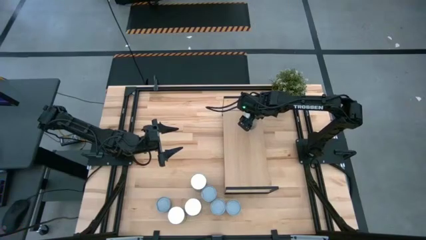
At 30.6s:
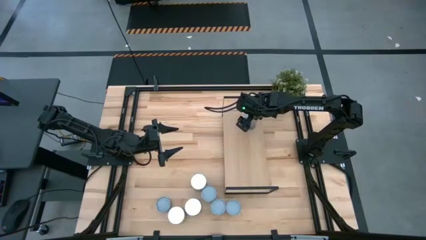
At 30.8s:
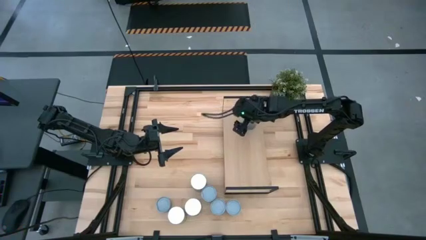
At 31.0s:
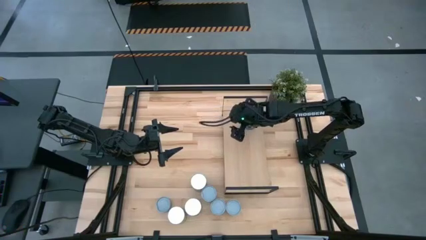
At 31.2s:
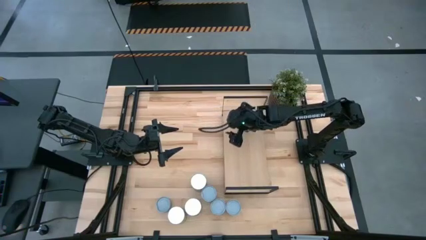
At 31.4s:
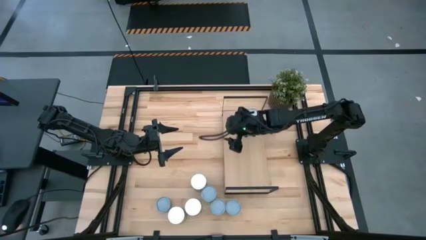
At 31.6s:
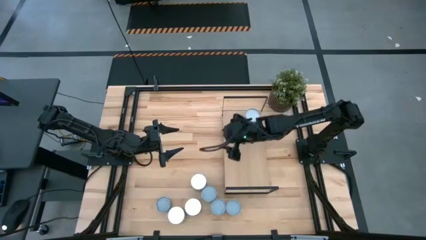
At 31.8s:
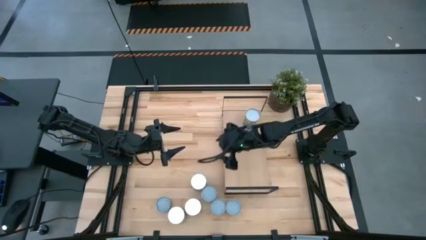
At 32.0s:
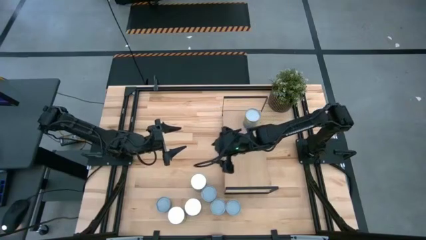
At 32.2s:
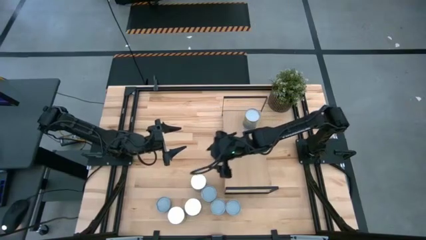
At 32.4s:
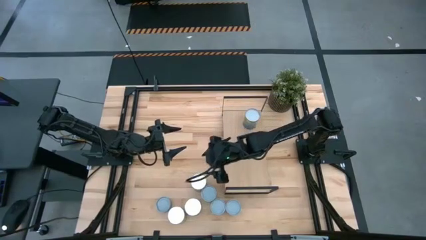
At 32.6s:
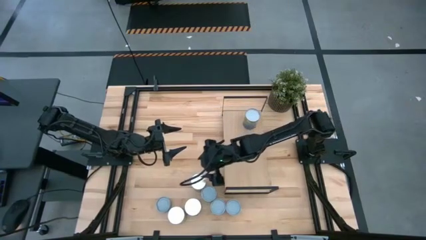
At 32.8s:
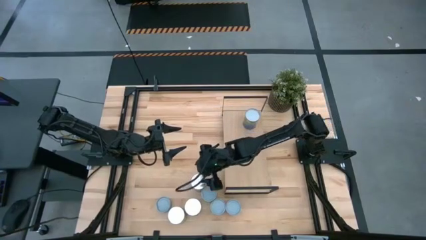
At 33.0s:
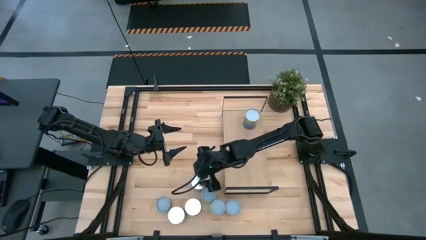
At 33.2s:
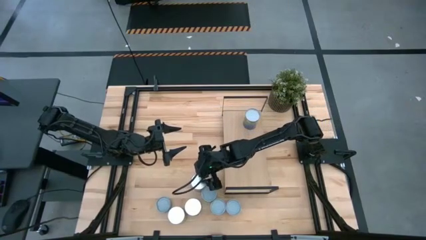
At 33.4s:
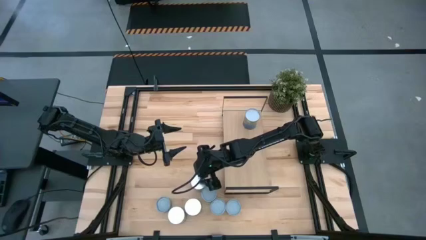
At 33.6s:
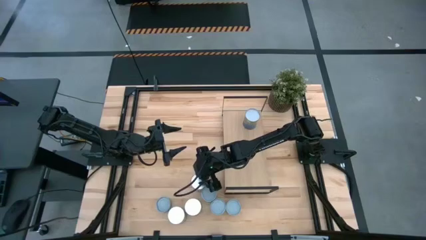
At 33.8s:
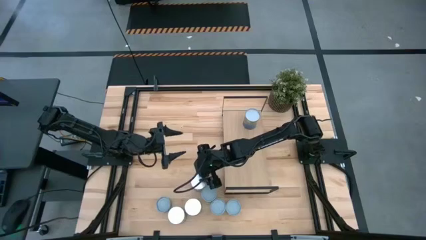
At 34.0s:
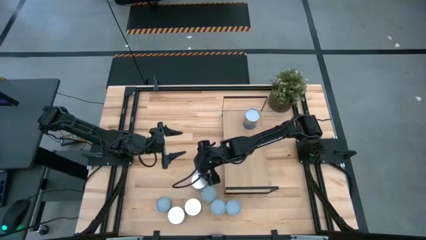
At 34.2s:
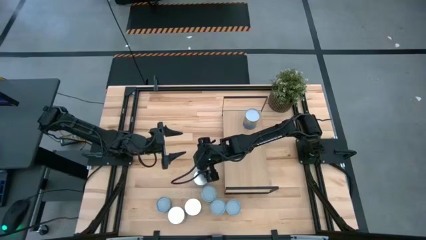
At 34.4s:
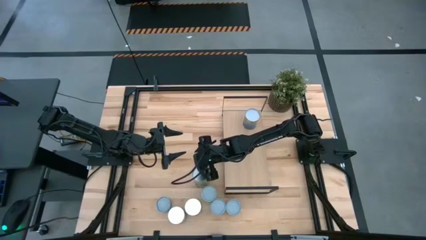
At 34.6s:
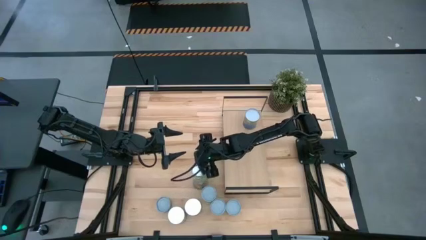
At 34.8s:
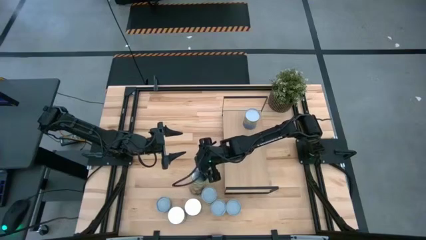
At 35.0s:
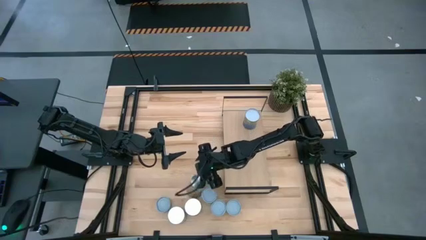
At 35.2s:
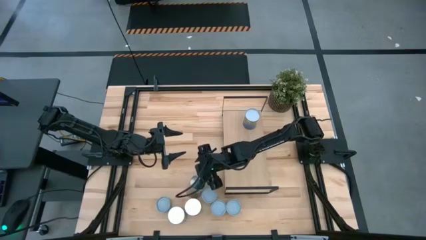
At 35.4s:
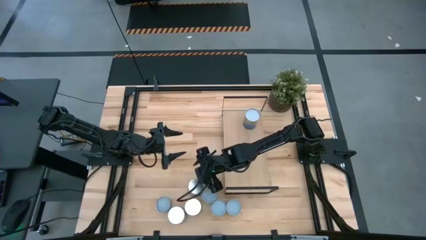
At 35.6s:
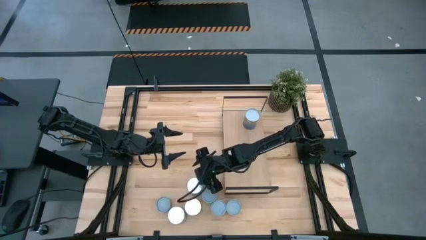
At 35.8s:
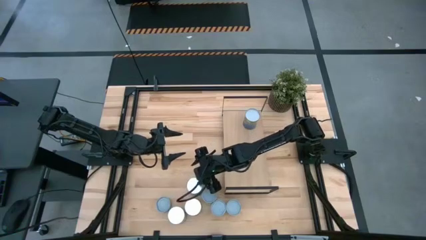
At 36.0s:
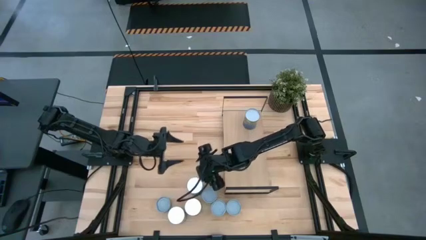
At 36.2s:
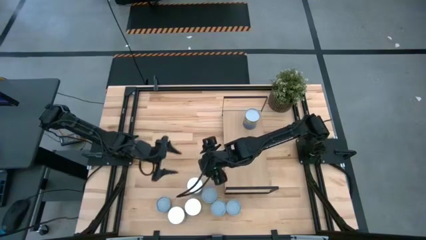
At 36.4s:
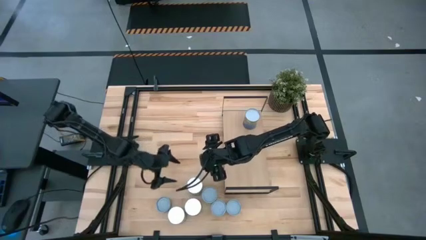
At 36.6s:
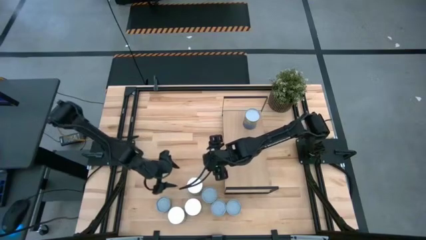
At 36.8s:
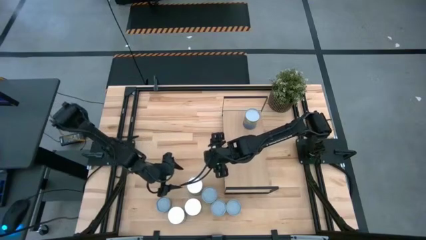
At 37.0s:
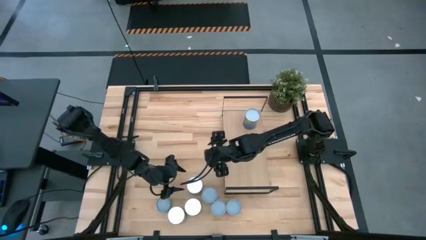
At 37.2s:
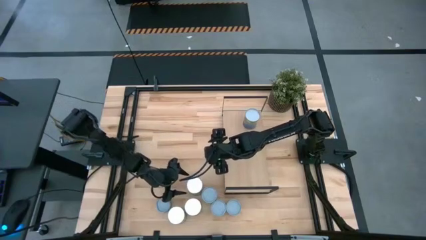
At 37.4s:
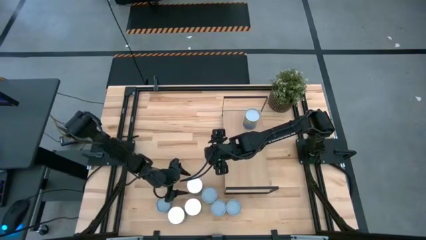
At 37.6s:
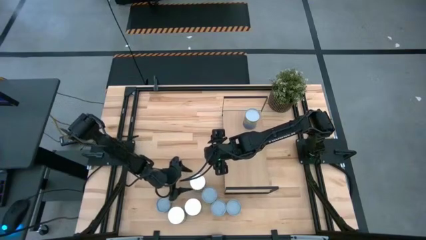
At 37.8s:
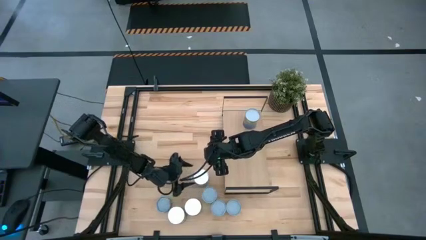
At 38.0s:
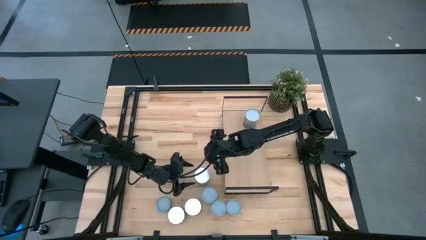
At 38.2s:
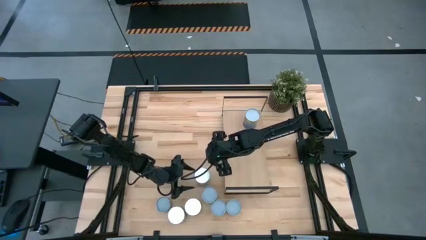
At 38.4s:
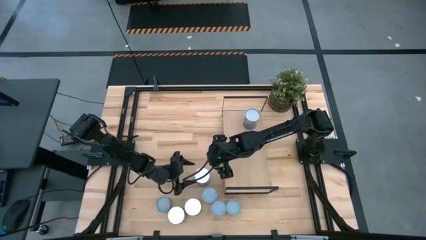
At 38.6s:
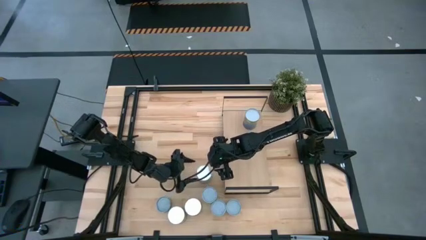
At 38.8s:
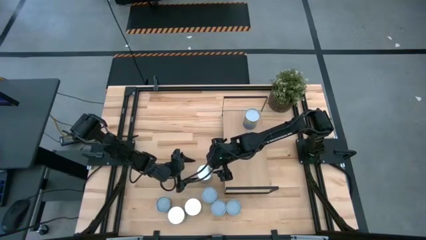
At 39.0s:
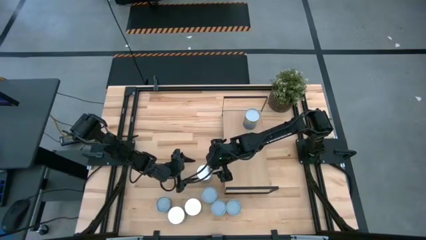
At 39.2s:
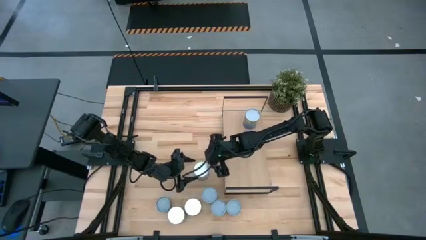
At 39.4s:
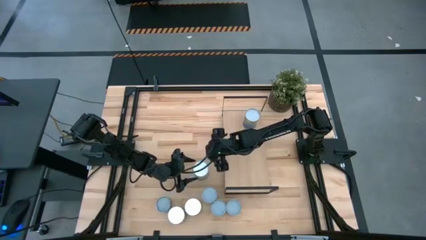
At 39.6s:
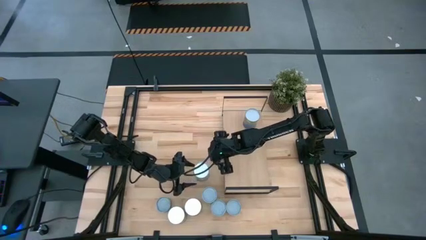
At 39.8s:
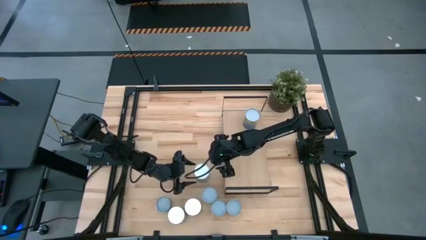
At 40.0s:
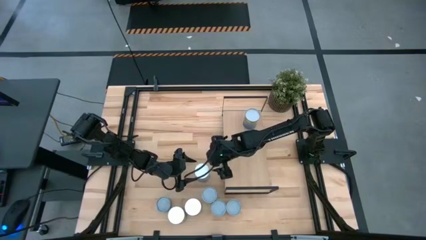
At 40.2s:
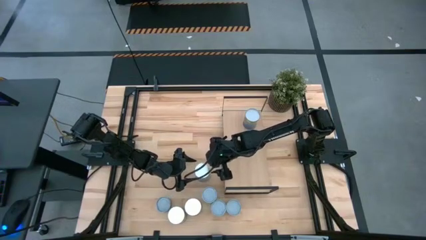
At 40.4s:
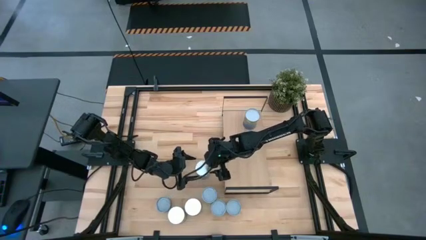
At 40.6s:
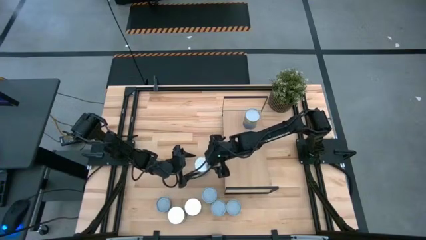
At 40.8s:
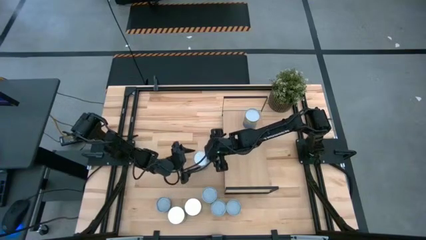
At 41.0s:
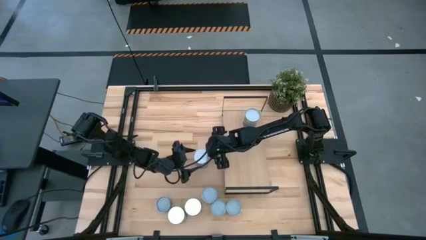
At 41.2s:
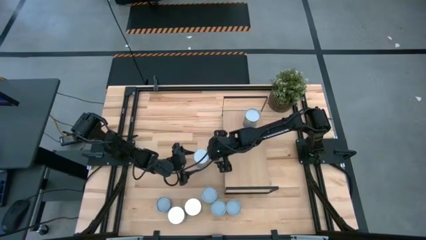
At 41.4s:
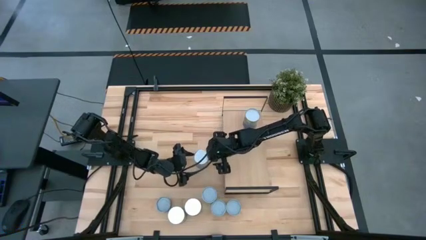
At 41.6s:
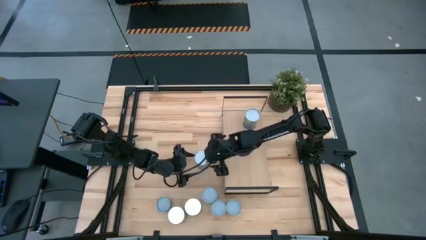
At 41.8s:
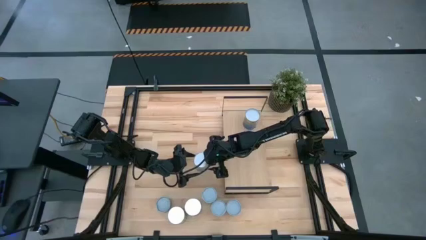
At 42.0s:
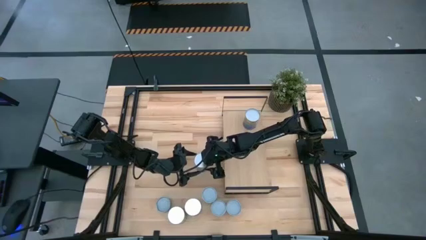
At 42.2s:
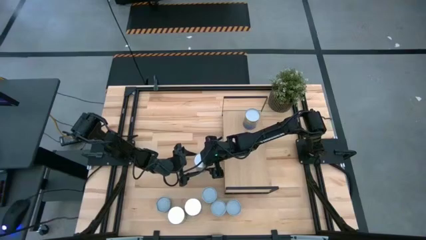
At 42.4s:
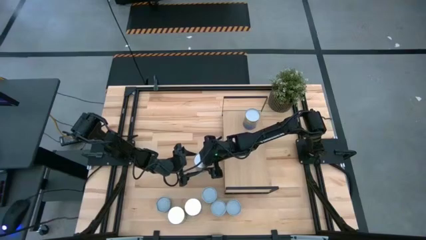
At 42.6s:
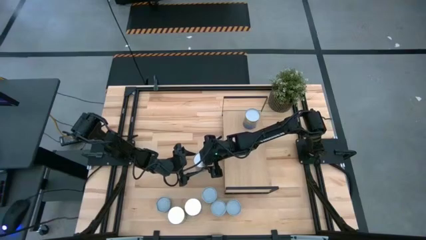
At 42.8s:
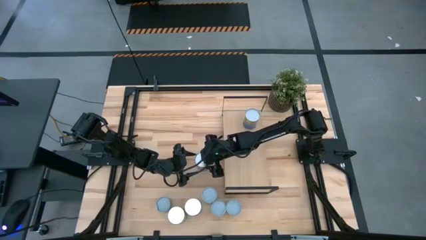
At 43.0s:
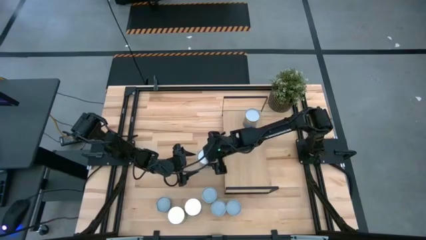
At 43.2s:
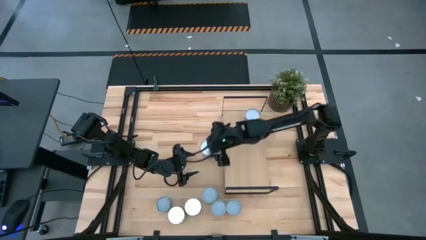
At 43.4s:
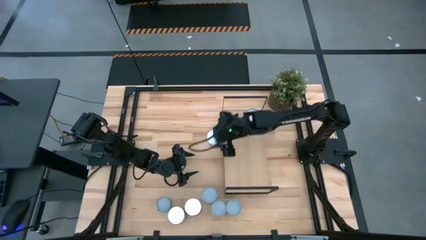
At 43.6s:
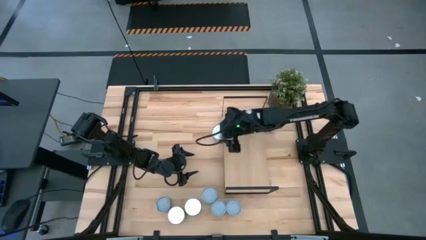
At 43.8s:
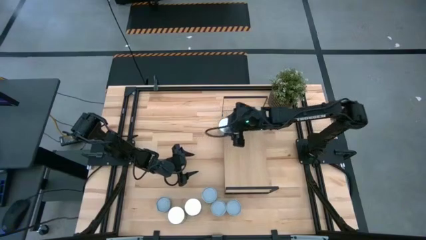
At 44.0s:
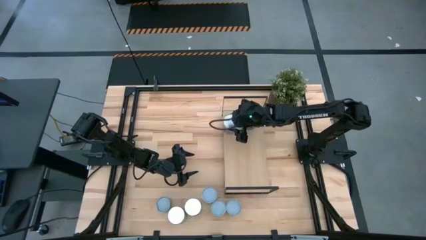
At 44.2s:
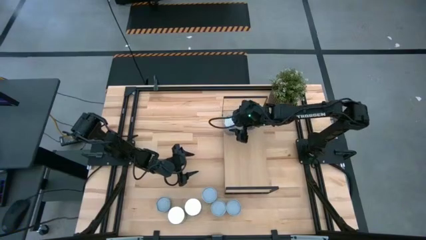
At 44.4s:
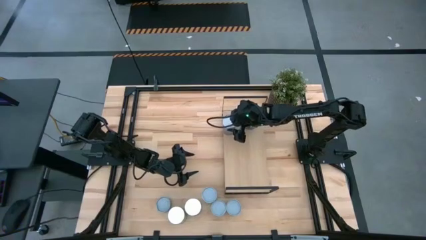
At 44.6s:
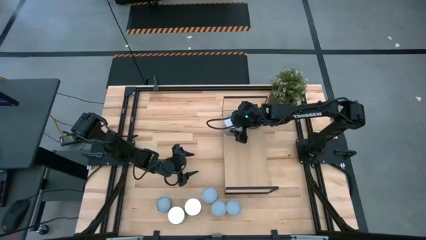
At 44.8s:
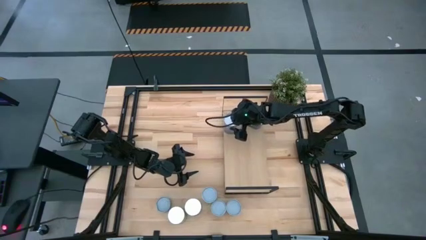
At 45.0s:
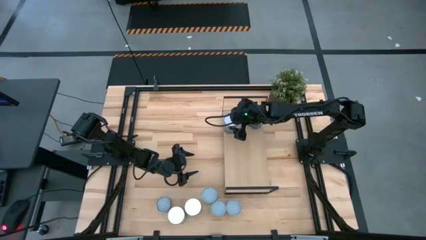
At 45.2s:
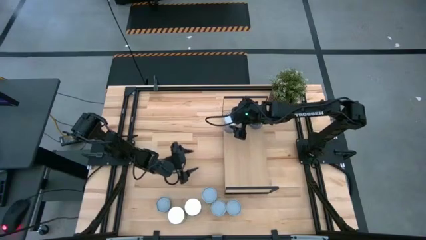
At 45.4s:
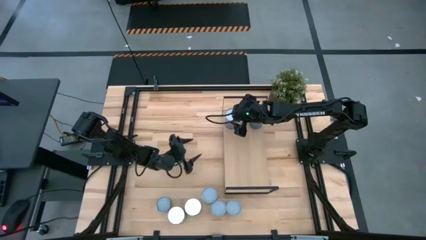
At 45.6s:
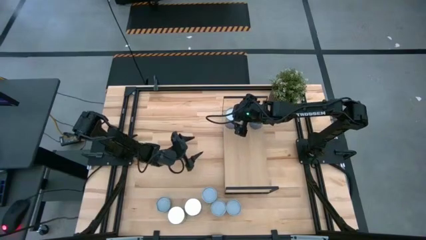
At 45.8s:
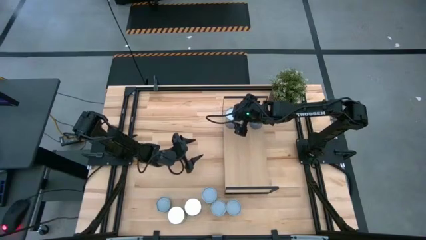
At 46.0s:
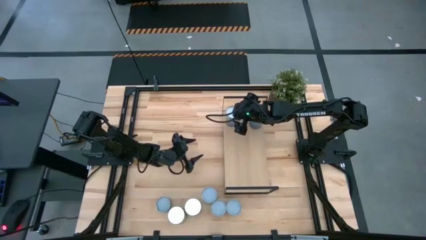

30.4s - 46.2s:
Task: Pick and place cans onto a shelf
Put the canned peaches on the shelf
